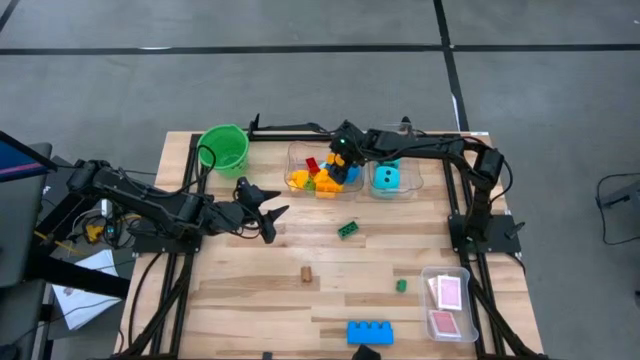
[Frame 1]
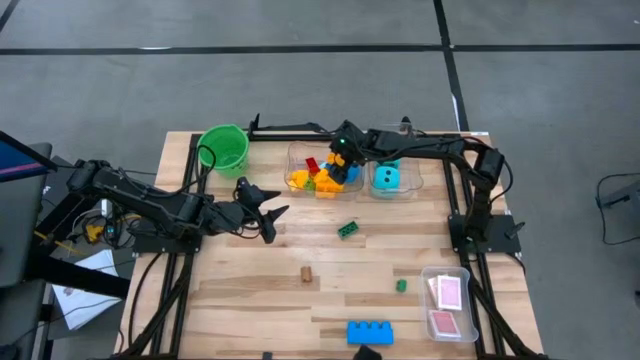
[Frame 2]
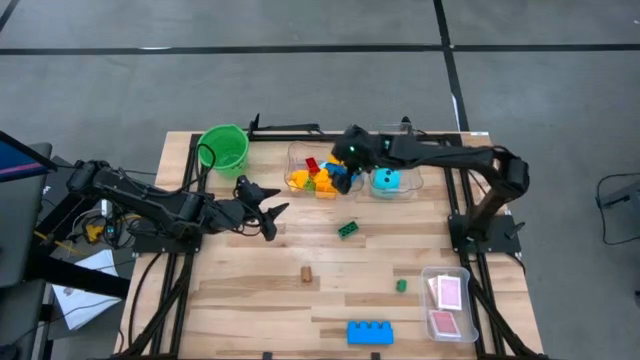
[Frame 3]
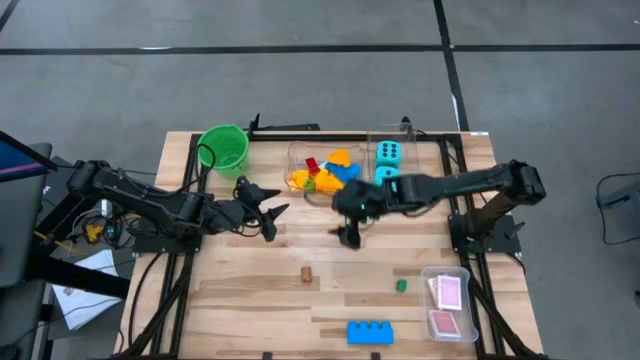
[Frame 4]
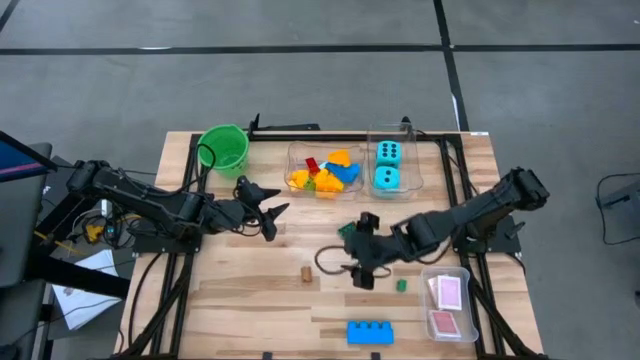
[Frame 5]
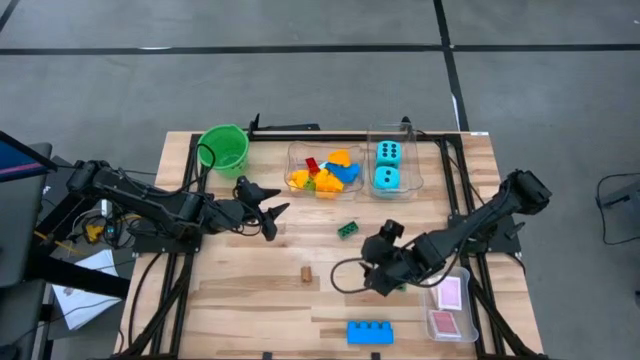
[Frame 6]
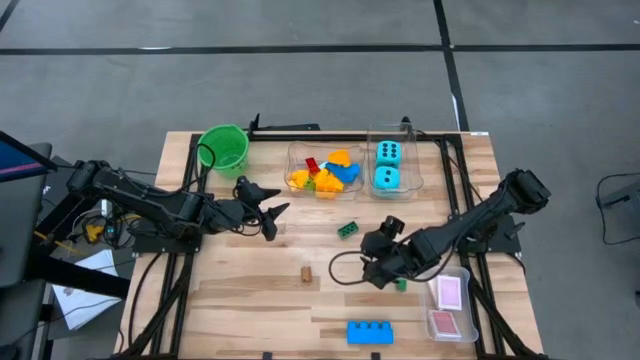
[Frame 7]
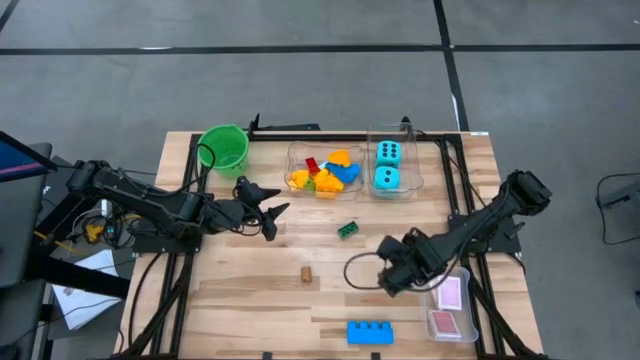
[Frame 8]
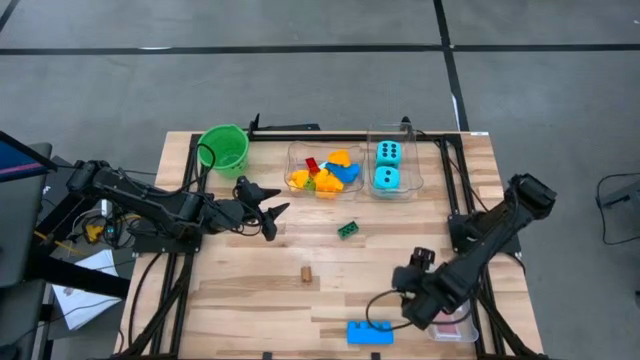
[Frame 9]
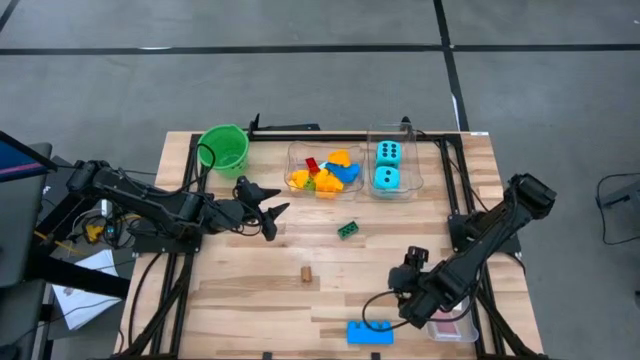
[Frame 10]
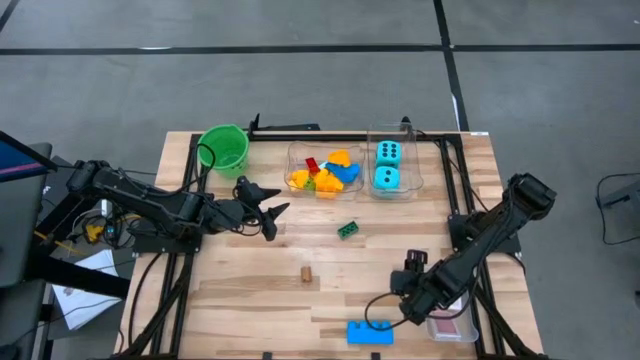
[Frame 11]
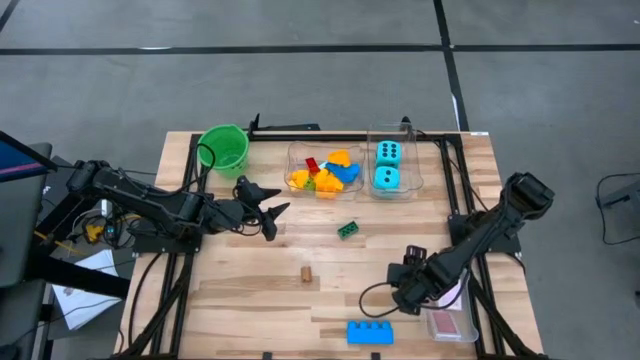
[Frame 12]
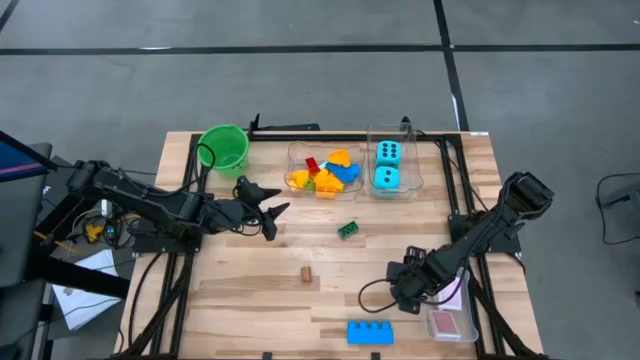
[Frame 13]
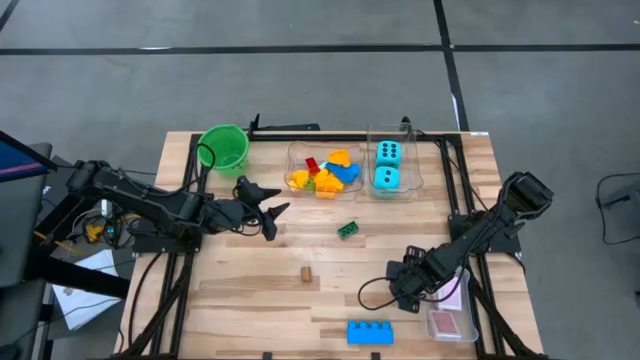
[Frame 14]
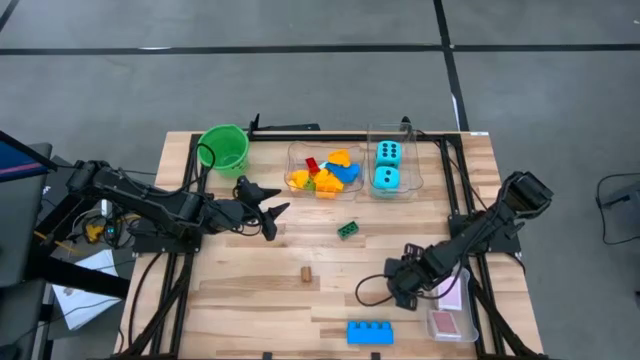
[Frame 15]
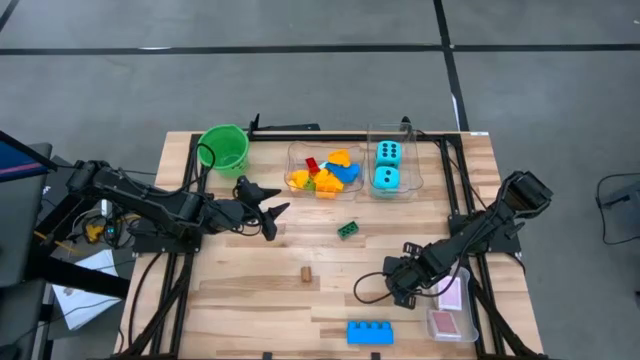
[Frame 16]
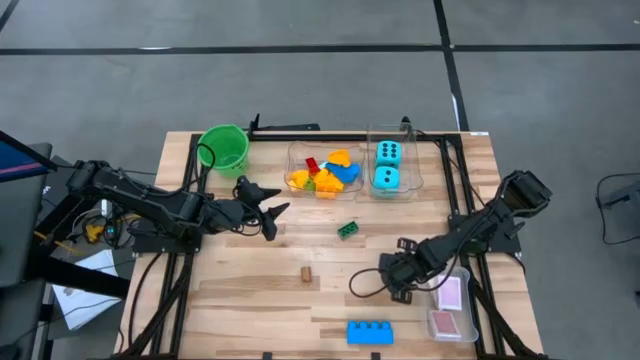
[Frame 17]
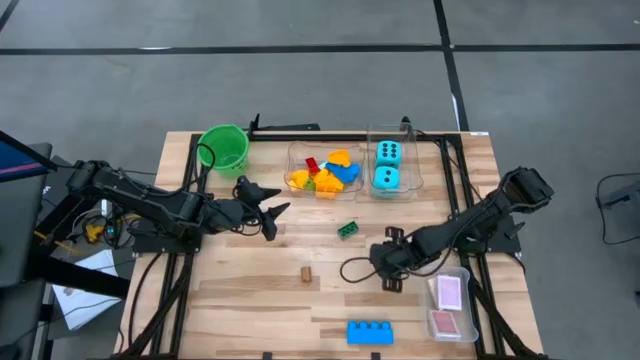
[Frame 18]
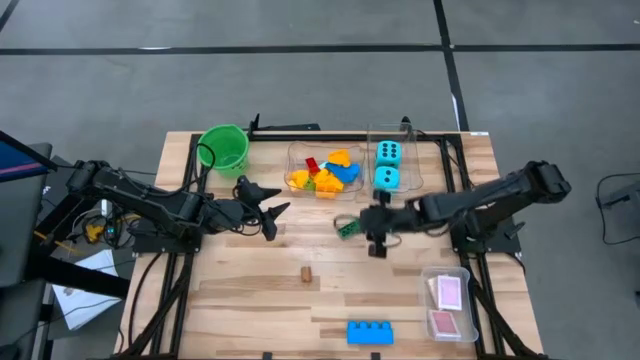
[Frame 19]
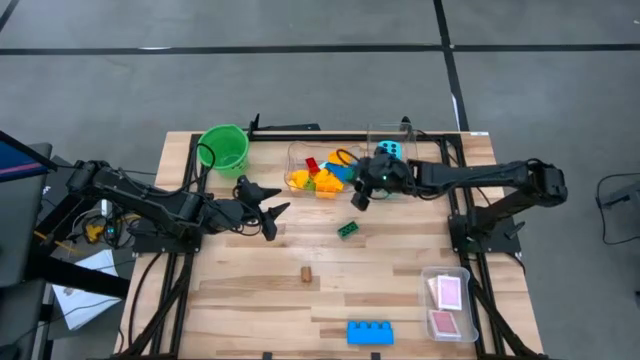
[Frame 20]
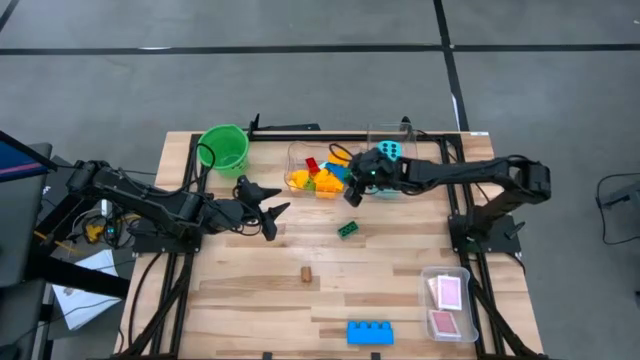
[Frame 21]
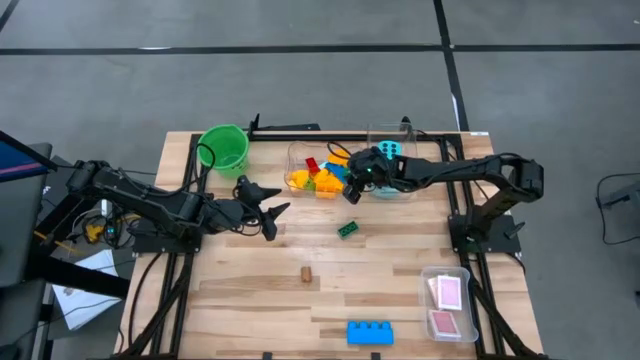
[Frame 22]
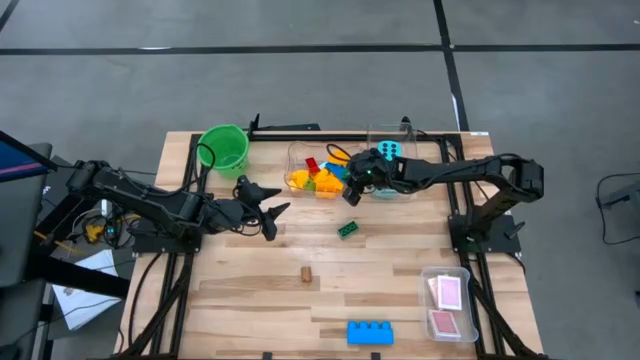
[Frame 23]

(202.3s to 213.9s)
Task: Pick & Place Toys
Put the green gamepiece into the left transparent bin

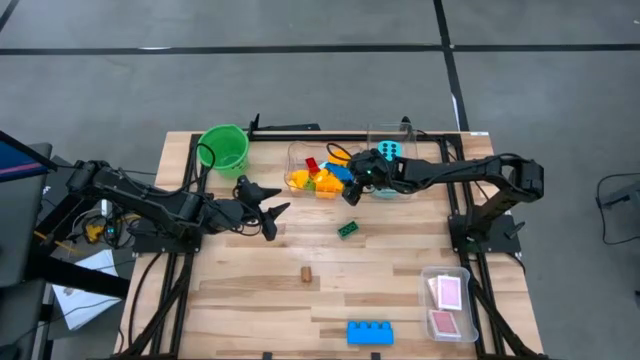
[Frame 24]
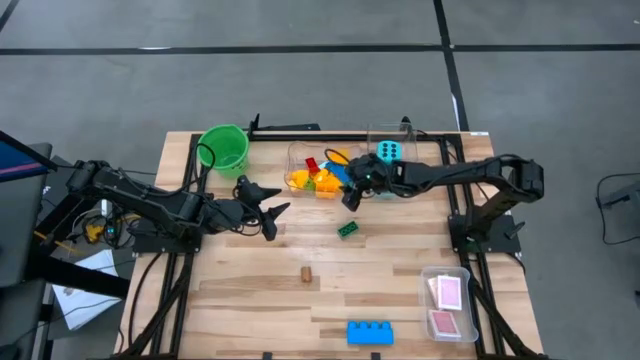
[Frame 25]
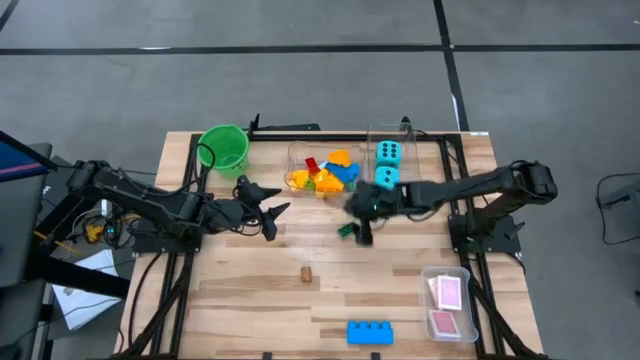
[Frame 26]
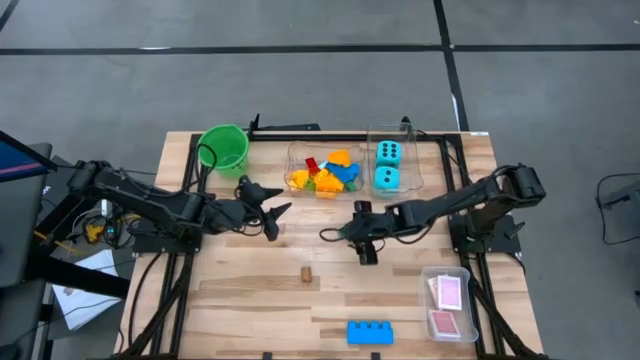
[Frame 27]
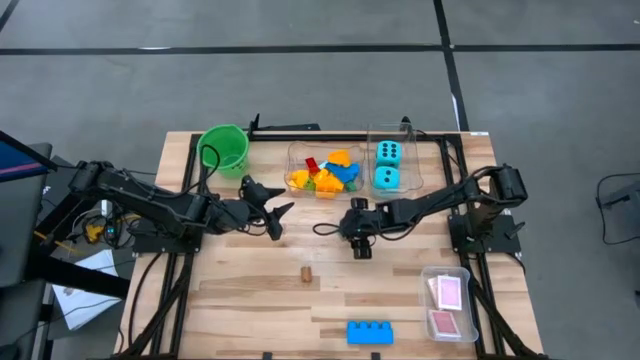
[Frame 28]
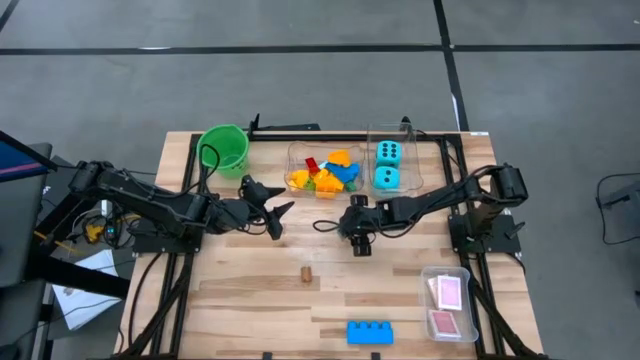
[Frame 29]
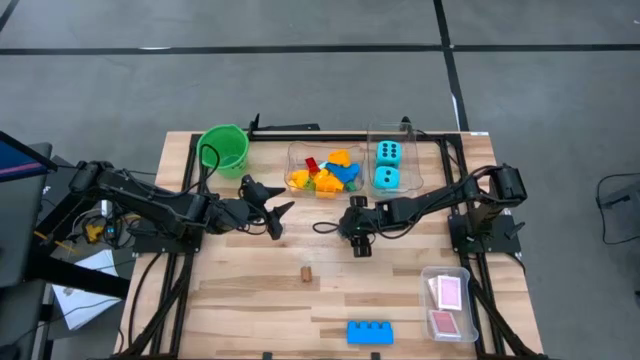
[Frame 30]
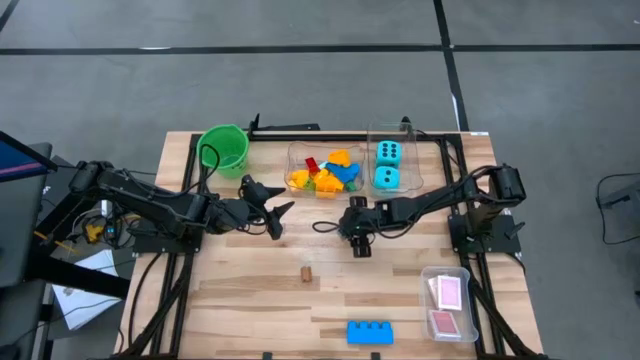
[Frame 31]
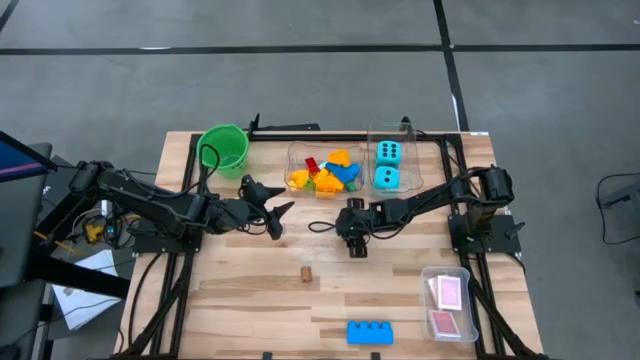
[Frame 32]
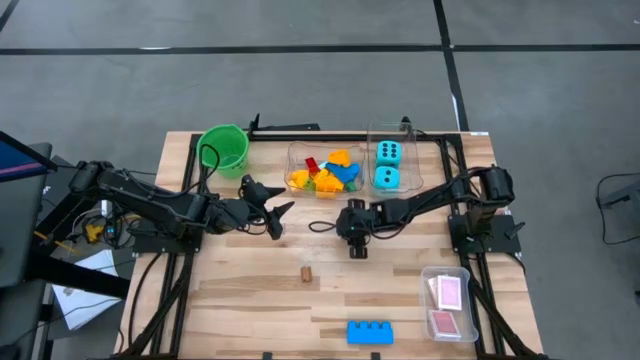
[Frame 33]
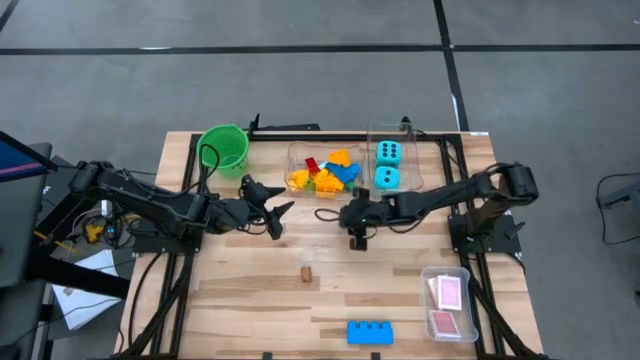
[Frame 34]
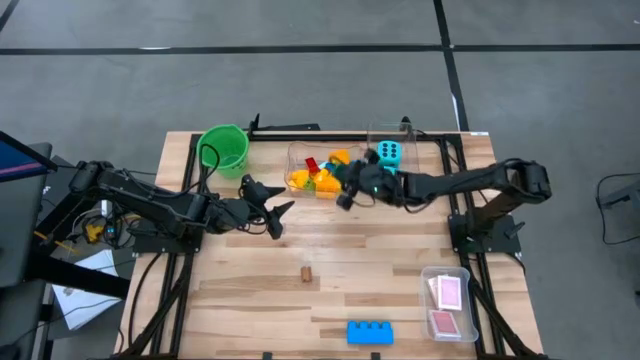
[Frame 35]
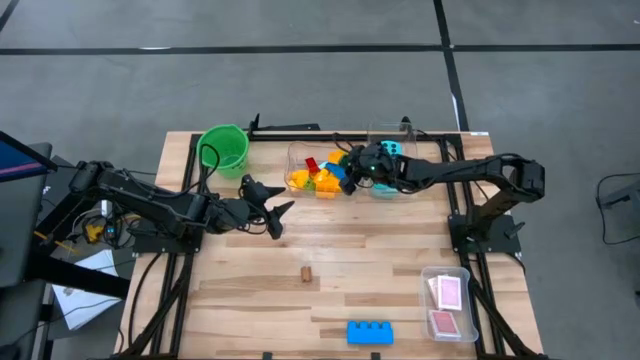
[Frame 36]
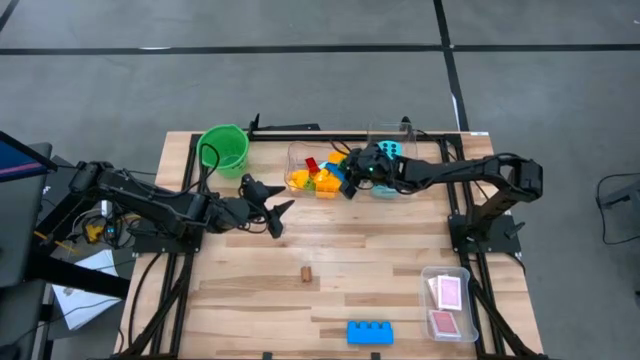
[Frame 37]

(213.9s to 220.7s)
Put the green gamepiece into the left transparent bin

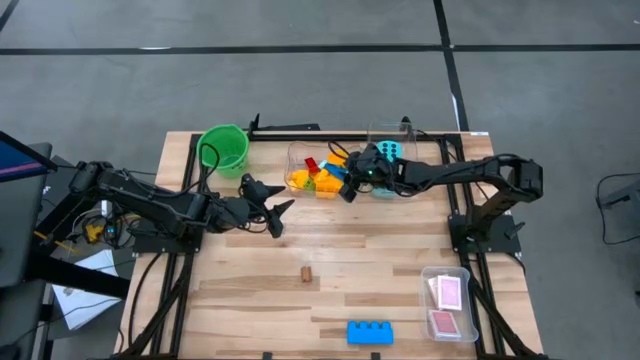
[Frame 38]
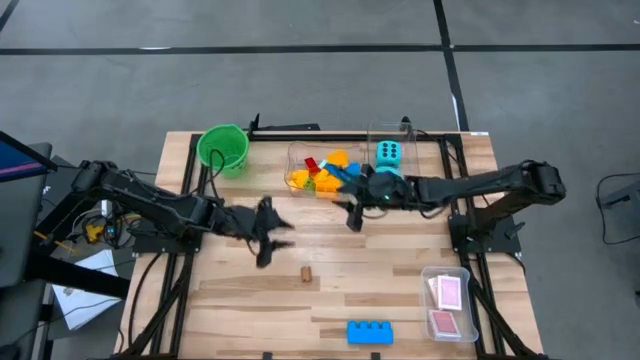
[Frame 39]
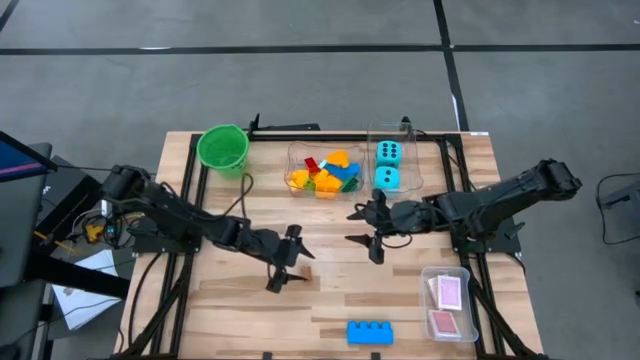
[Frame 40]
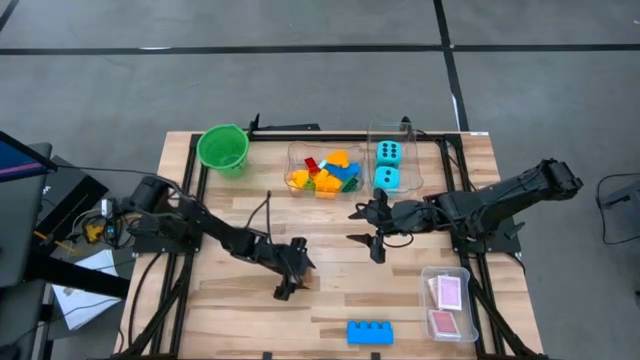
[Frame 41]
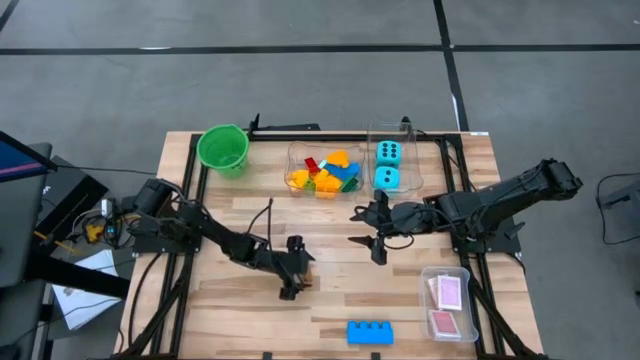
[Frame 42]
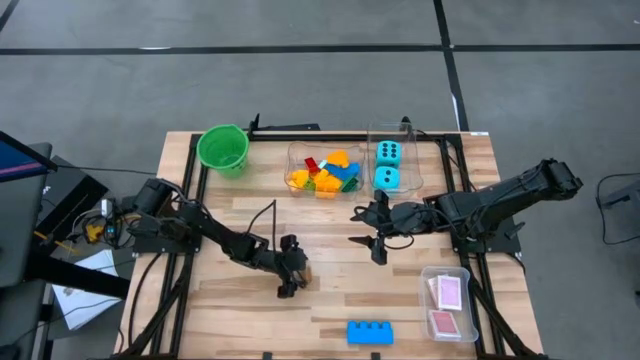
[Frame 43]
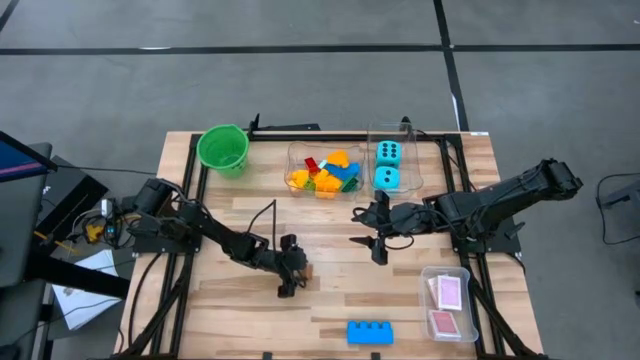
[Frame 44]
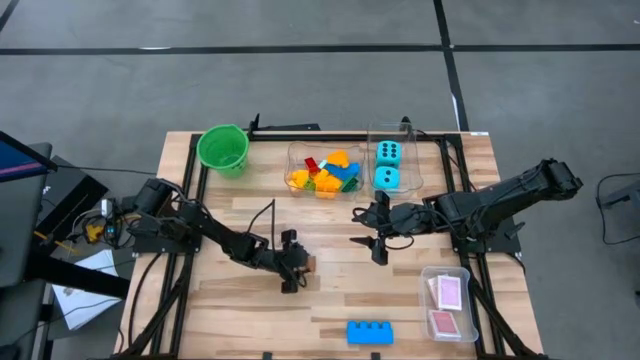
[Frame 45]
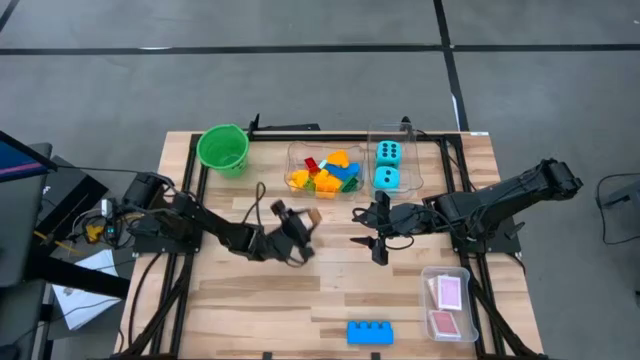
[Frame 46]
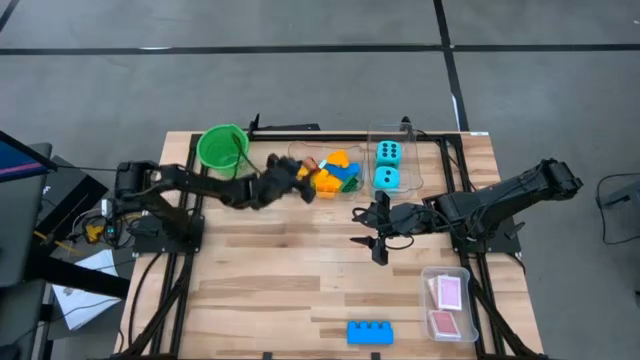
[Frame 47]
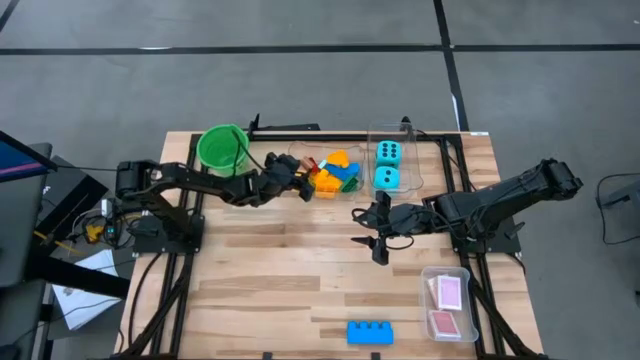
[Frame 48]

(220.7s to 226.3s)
Put the brown gamepiece into the left transparent bin
